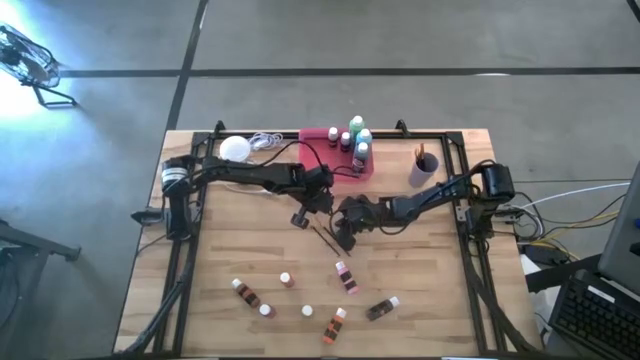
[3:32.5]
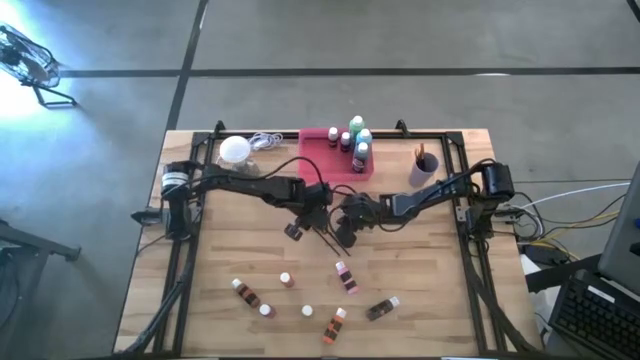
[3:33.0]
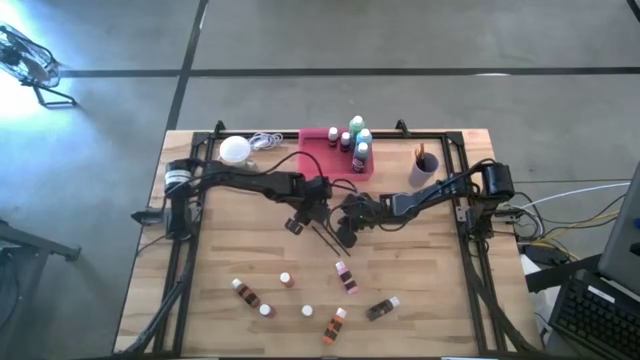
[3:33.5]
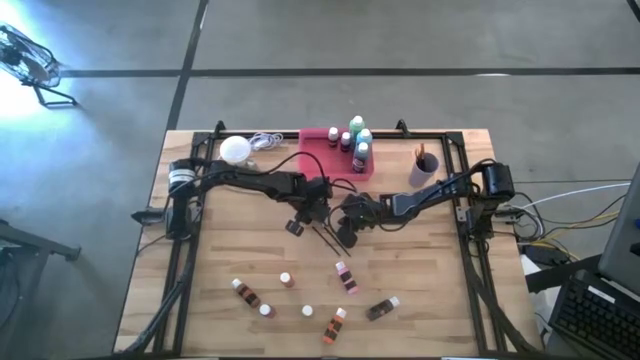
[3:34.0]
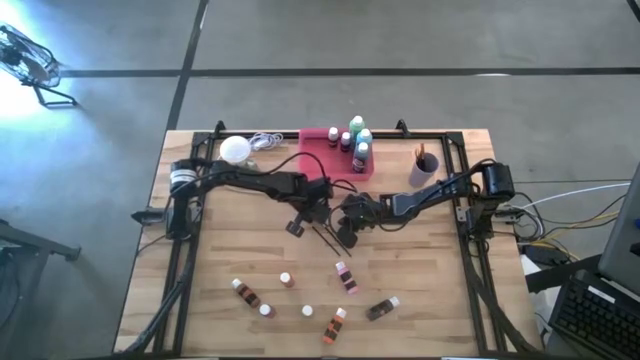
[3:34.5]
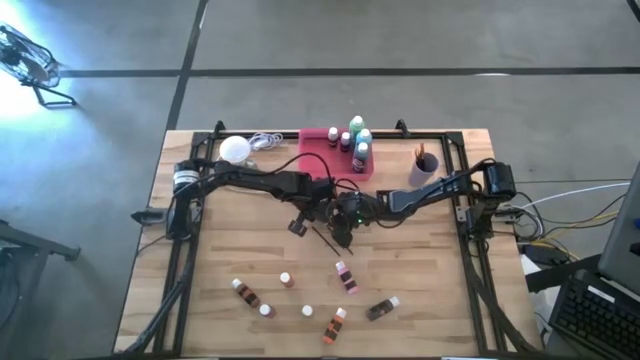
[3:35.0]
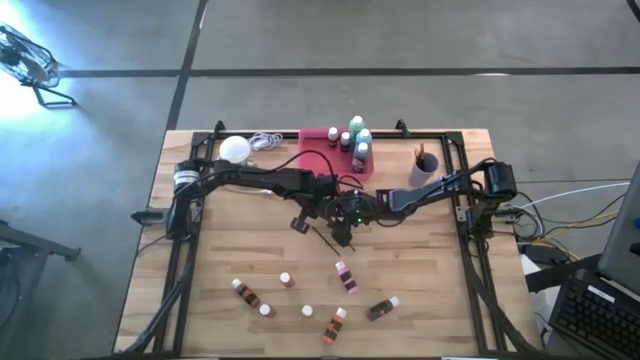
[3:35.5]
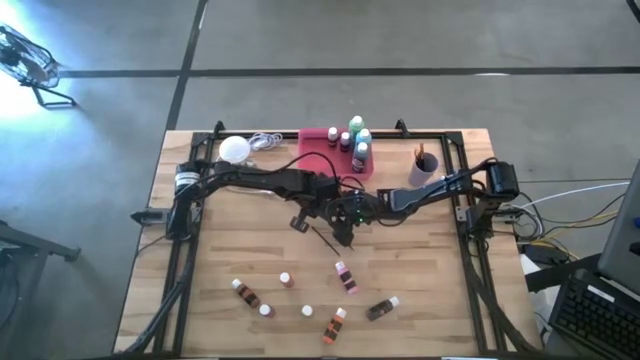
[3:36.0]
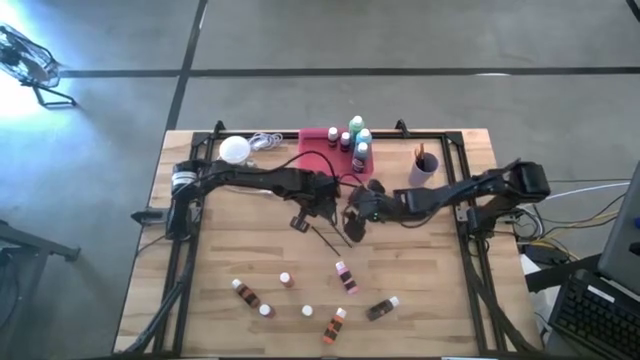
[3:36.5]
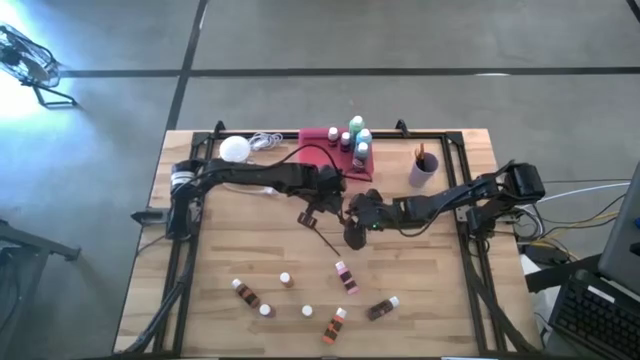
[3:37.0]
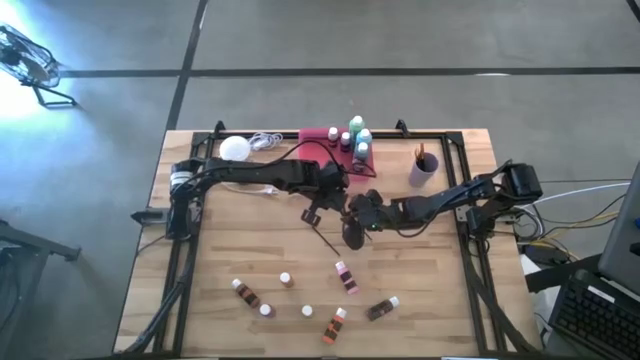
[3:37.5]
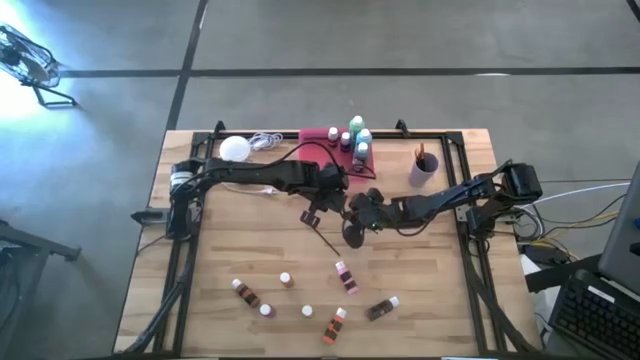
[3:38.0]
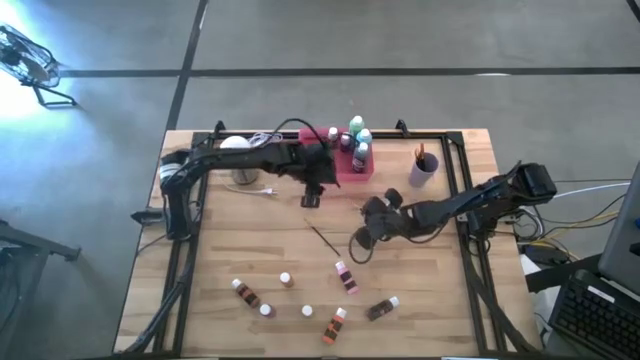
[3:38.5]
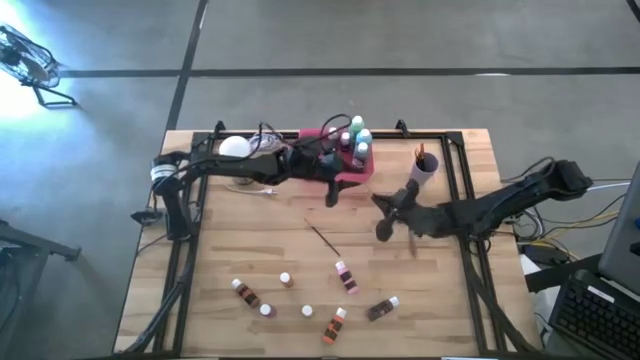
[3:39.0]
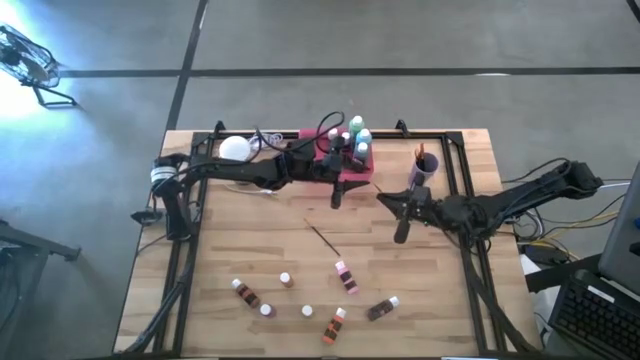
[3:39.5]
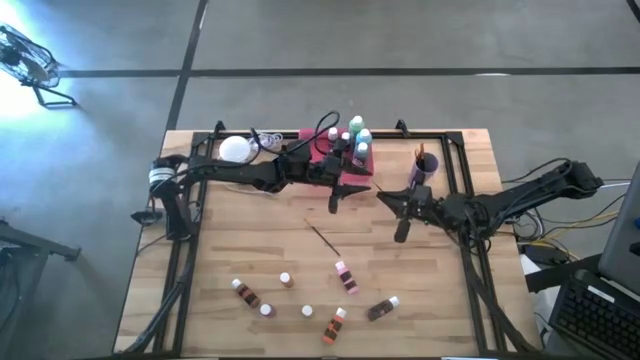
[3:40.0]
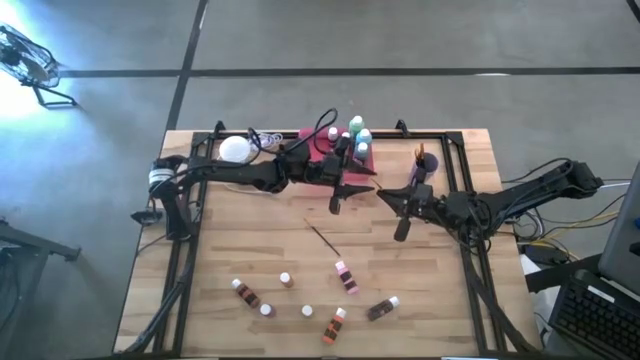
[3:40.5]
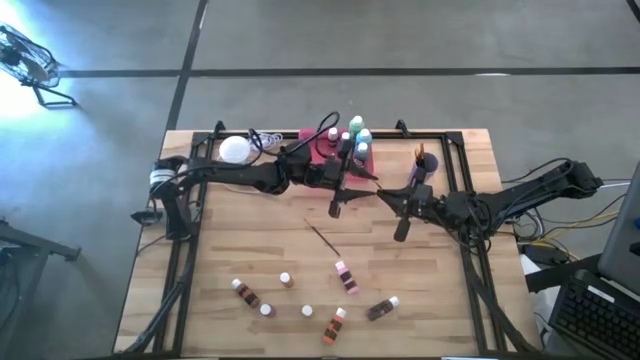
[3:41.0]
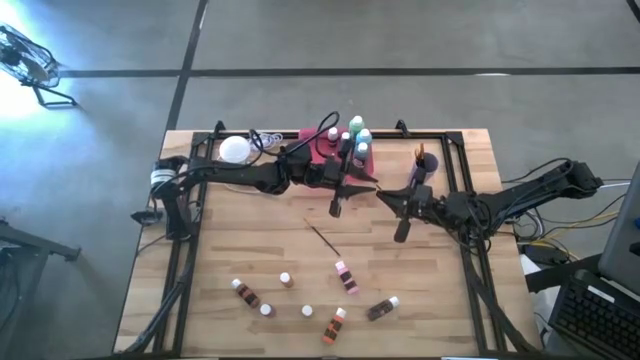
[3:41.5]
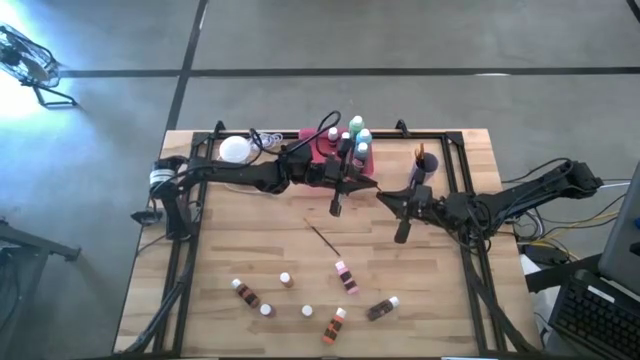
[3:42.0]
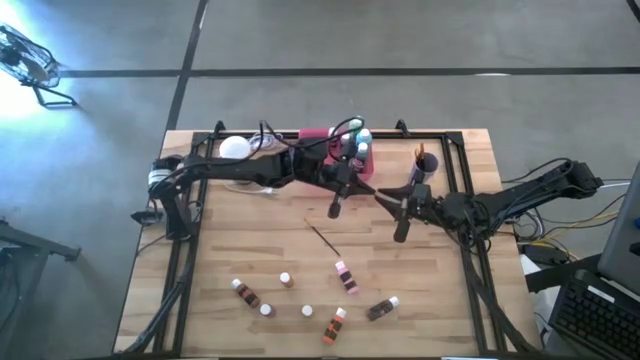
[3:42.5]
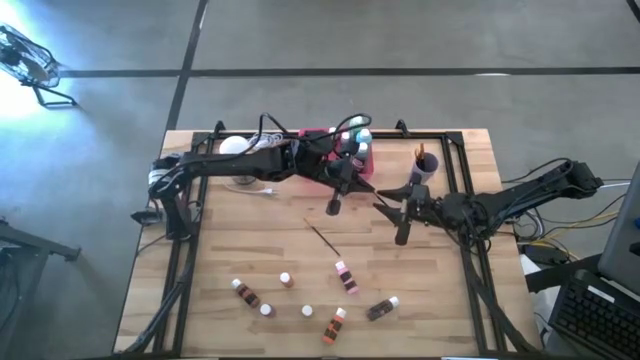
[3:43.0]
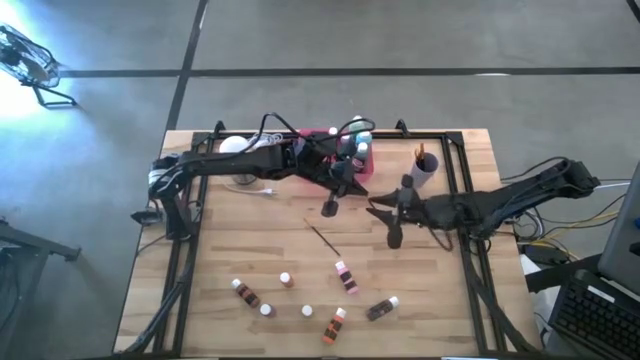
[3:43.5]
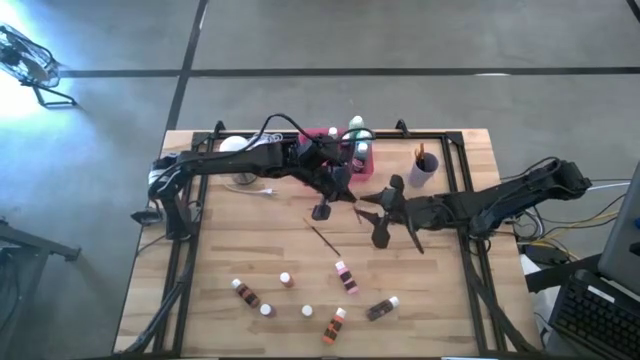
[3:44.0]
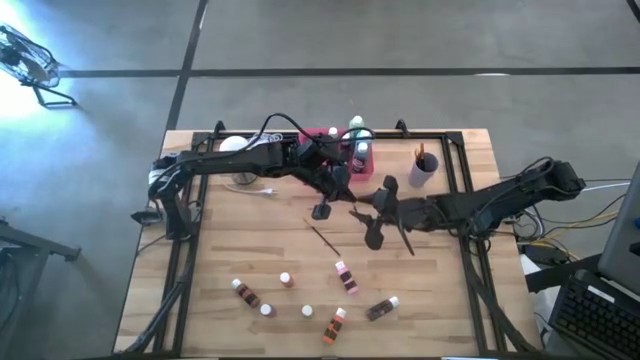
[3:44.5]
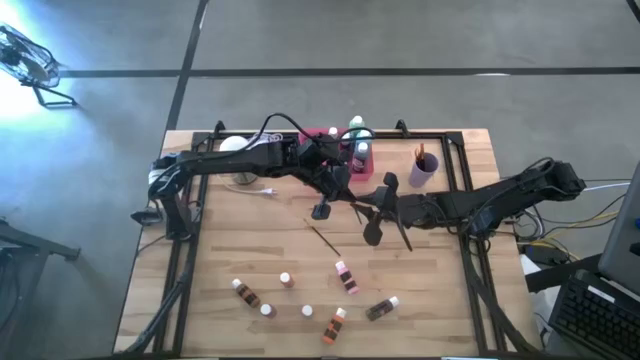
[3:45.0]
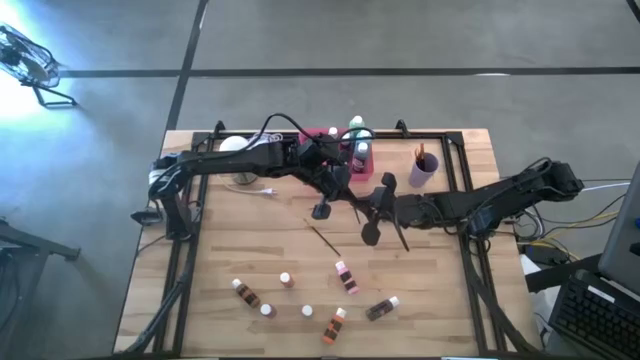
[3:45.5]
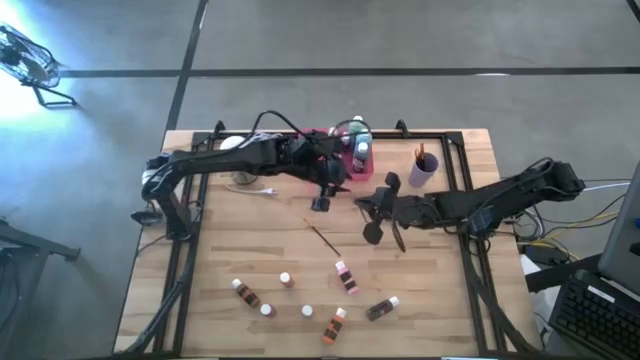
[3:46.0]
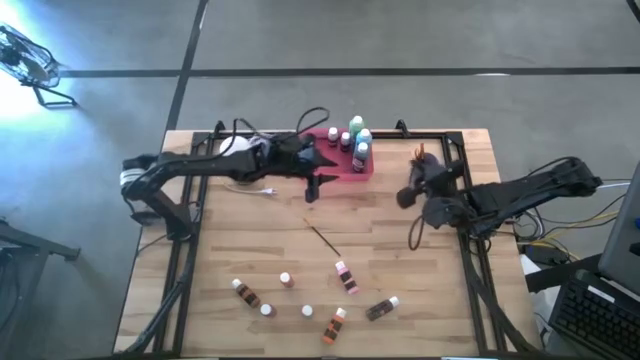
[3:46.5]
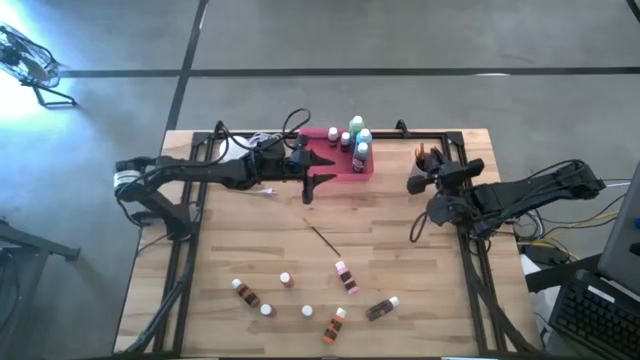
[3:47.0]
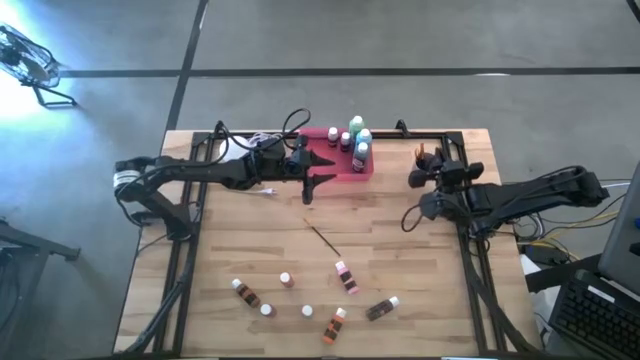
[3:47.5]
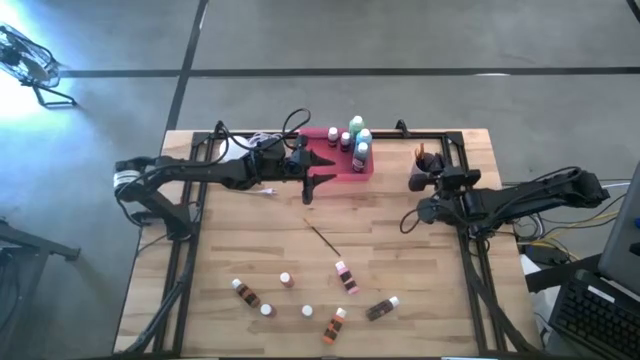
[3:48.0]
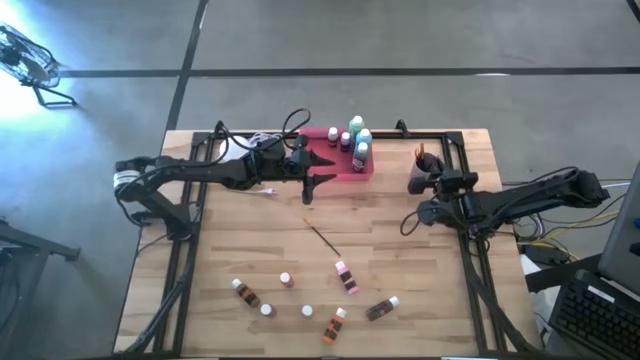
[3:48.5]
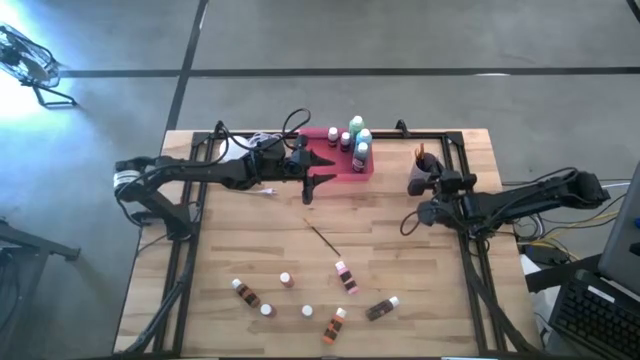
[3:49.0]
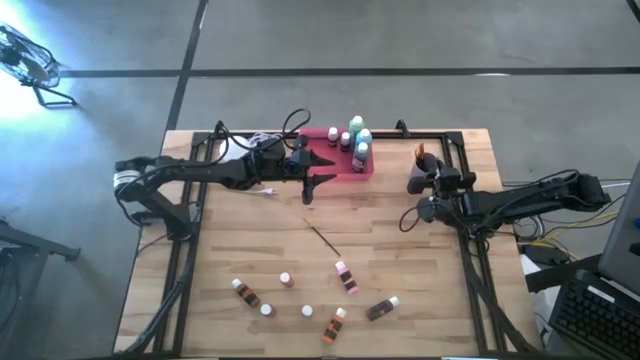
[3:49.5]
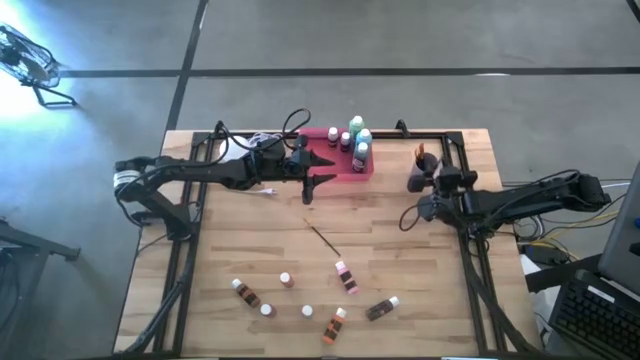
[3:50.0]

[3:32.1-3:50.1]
Task: Pick & Place Paint Supplies
Put the black gold paint brush into the violet cup

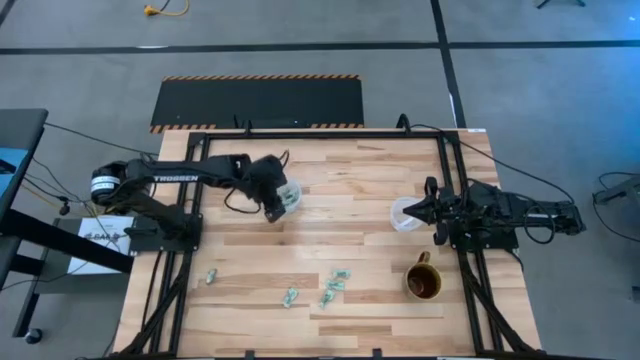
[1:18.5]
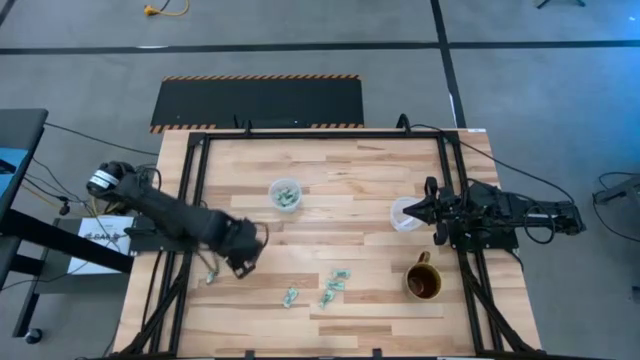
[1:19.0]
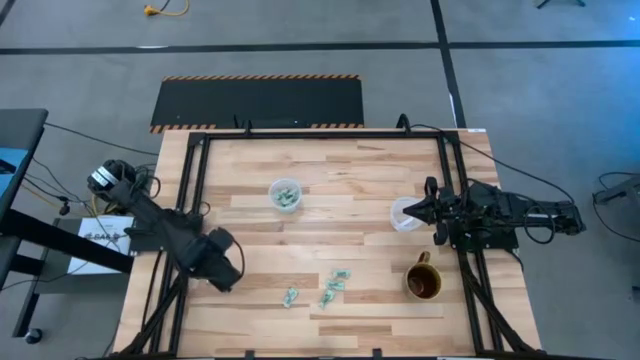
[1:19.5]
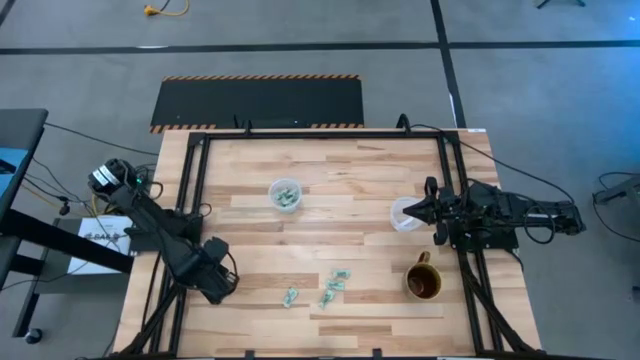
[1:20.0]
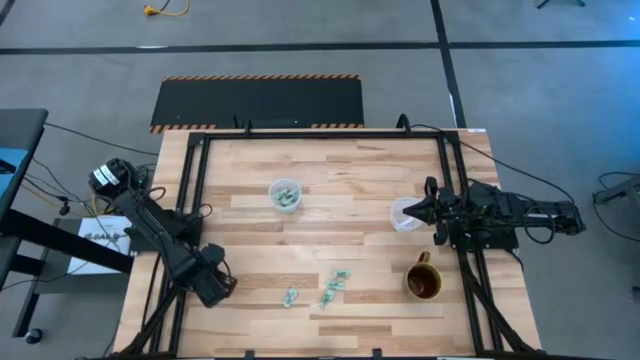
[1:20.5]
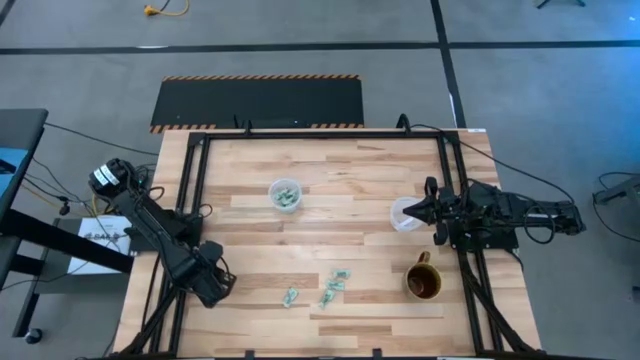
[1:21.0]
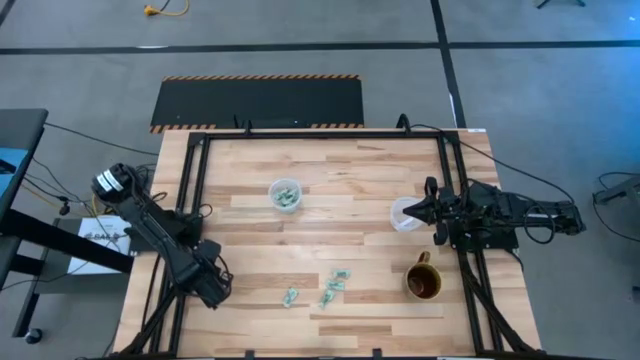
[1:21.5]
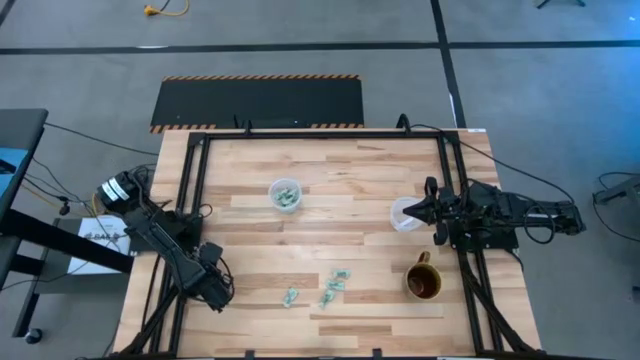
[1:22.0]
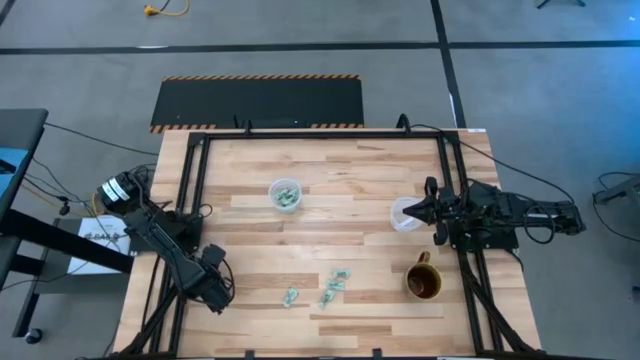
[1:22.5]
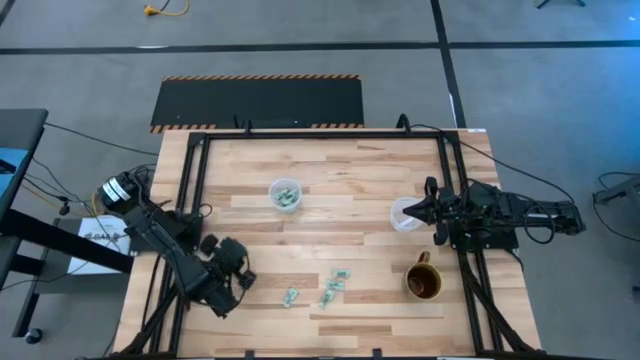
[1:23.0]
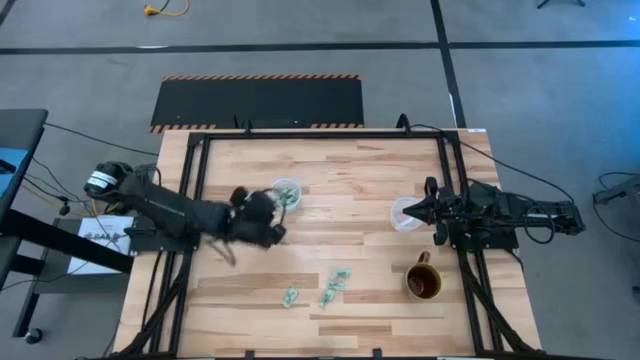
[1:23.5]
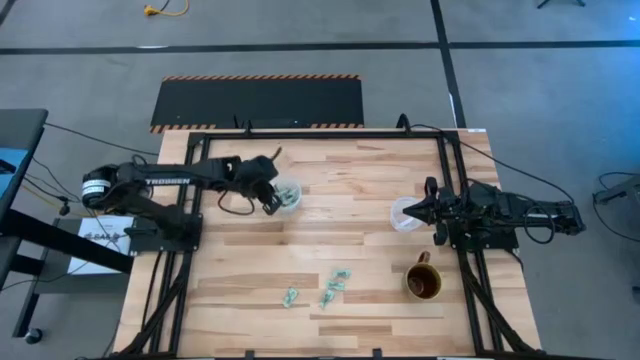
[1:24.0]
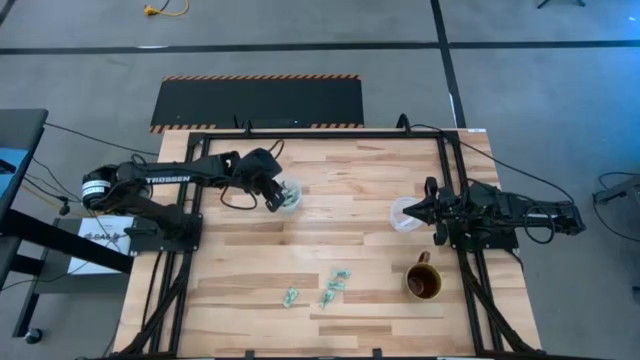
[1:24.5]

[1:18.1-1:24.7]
Task: Pick and place Stevia / Truvia into bins
Put the green truvia packet into the left transparent container
